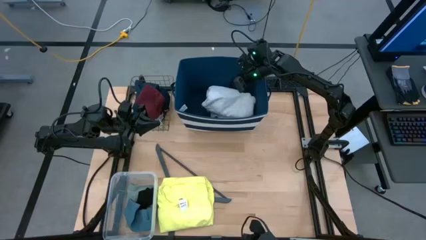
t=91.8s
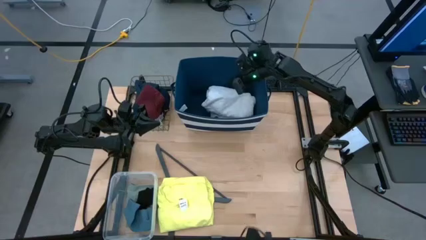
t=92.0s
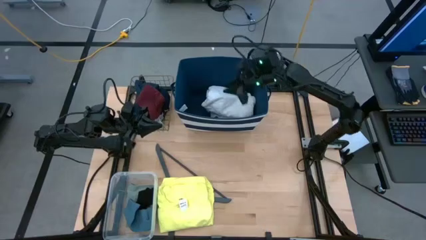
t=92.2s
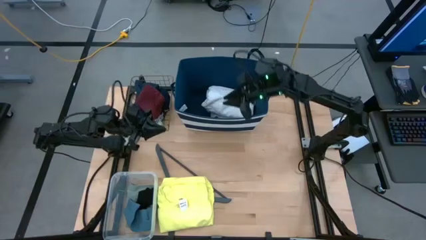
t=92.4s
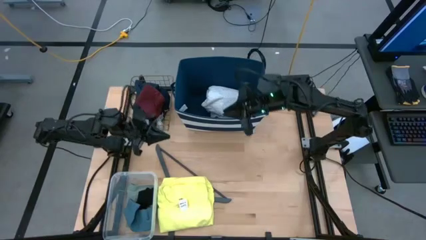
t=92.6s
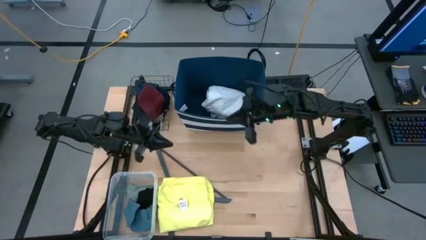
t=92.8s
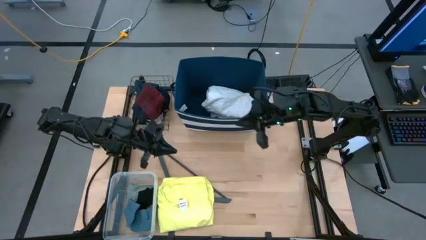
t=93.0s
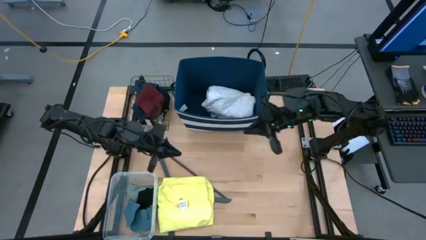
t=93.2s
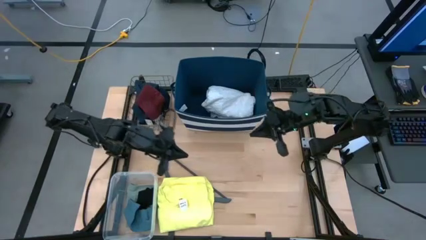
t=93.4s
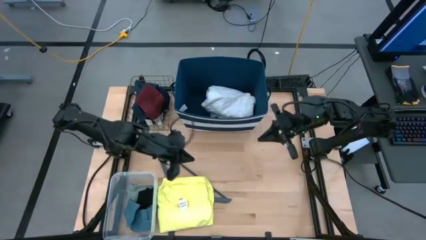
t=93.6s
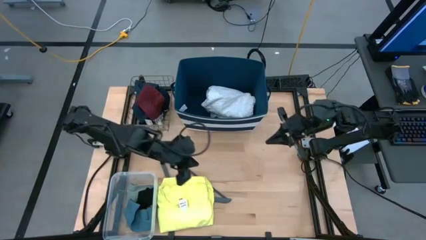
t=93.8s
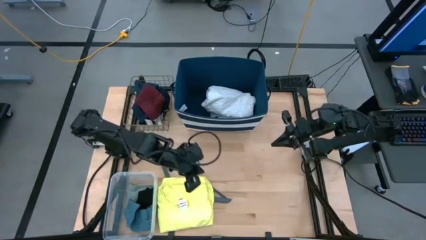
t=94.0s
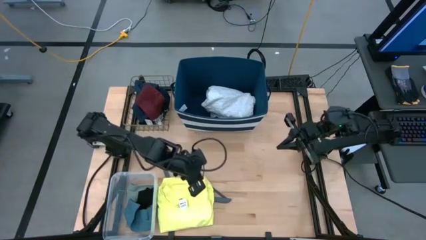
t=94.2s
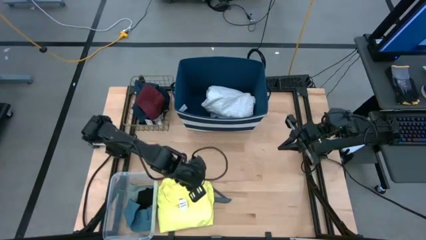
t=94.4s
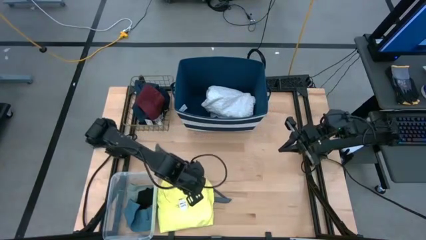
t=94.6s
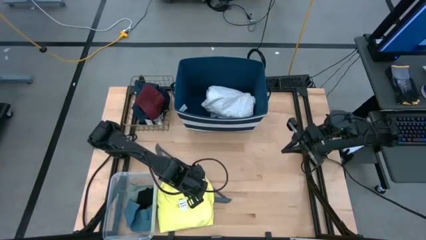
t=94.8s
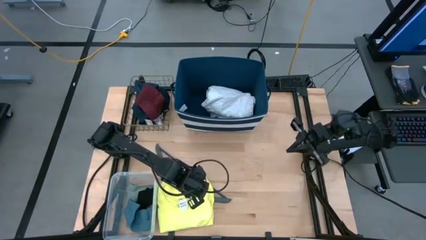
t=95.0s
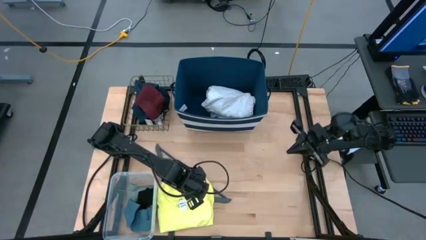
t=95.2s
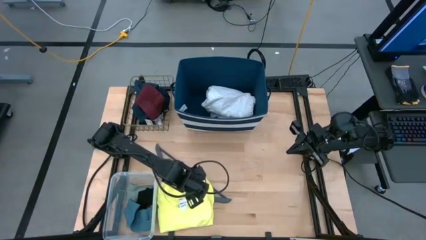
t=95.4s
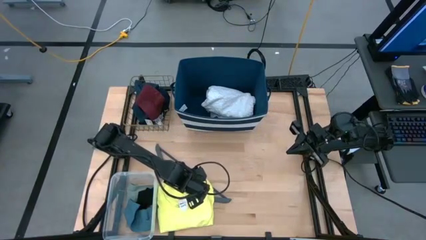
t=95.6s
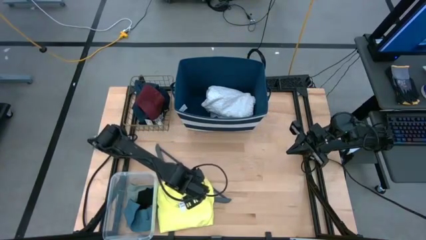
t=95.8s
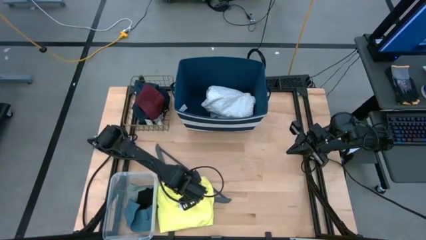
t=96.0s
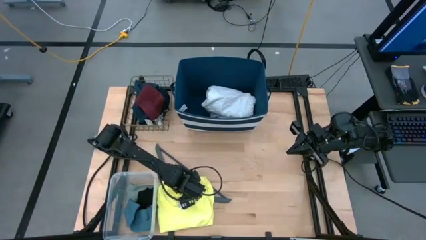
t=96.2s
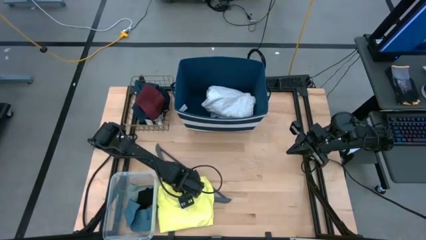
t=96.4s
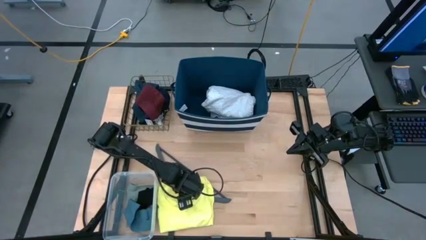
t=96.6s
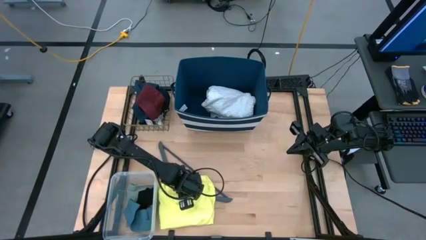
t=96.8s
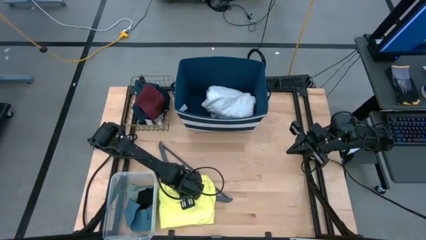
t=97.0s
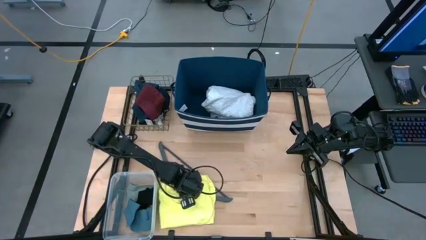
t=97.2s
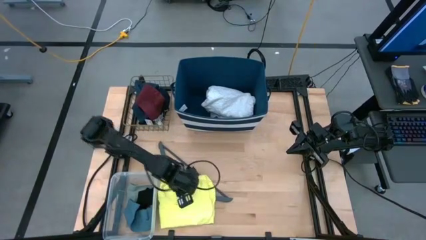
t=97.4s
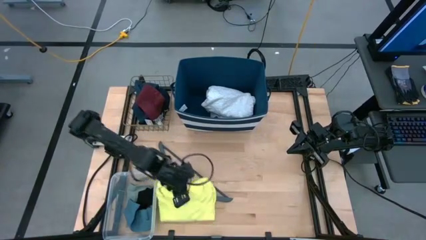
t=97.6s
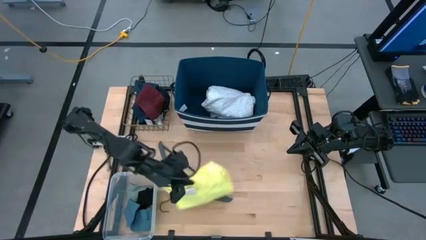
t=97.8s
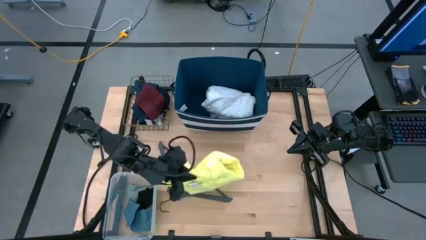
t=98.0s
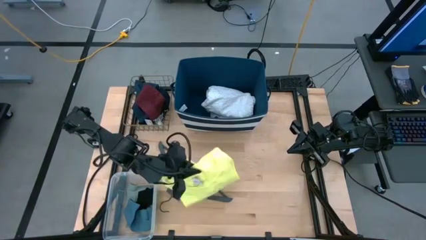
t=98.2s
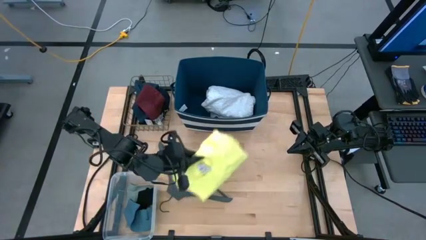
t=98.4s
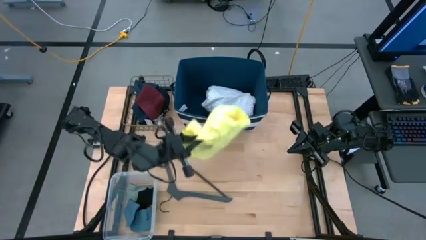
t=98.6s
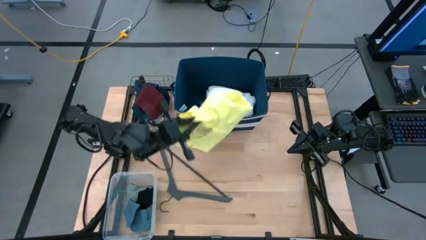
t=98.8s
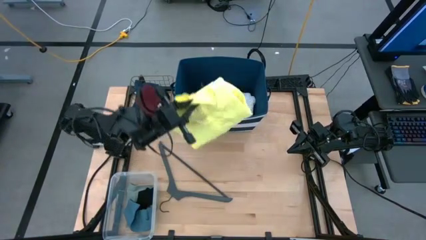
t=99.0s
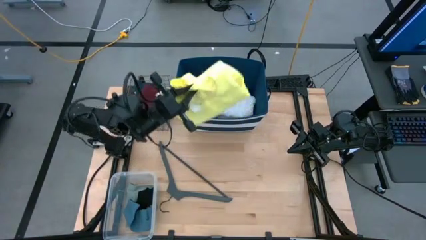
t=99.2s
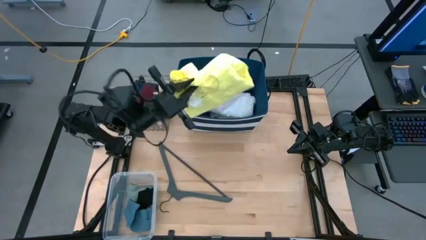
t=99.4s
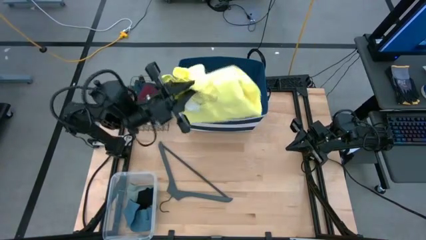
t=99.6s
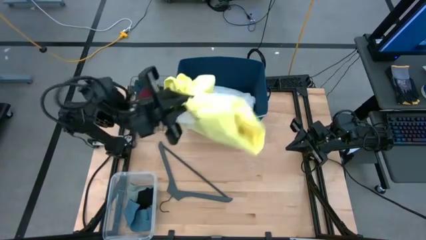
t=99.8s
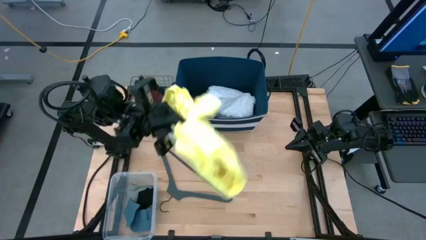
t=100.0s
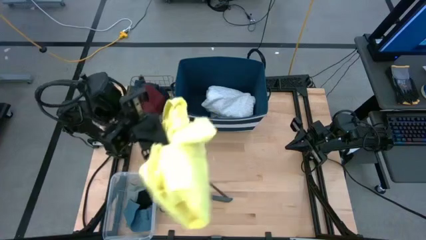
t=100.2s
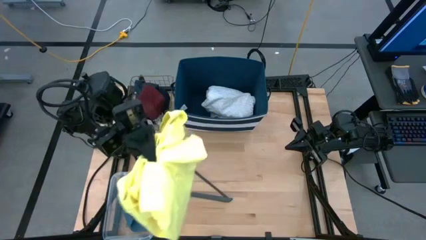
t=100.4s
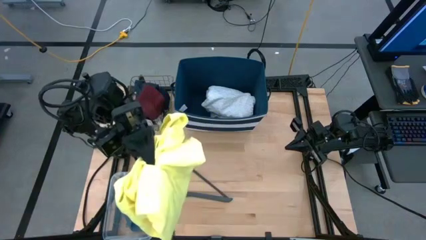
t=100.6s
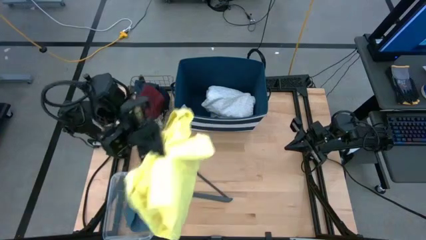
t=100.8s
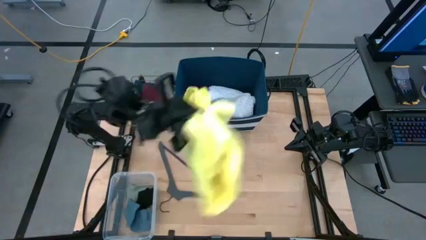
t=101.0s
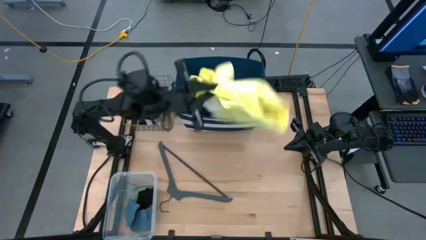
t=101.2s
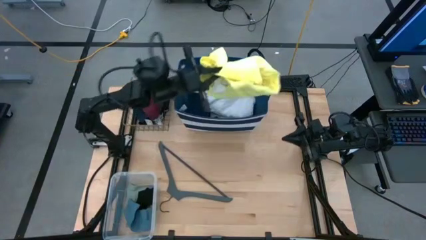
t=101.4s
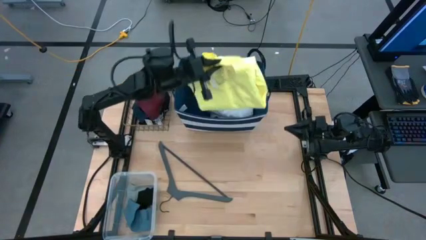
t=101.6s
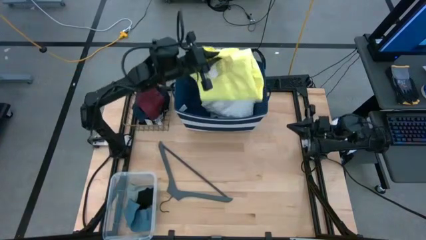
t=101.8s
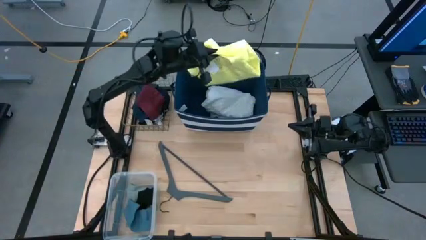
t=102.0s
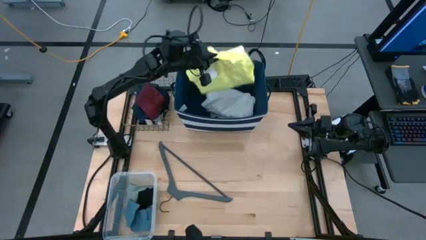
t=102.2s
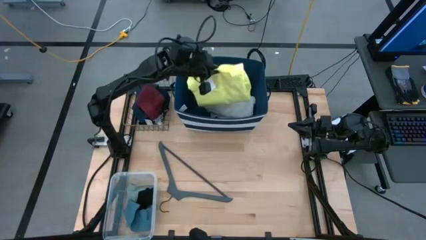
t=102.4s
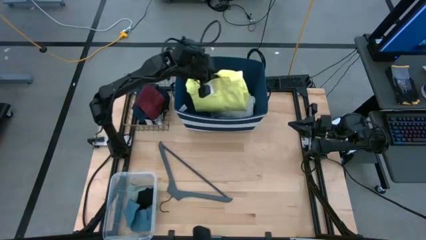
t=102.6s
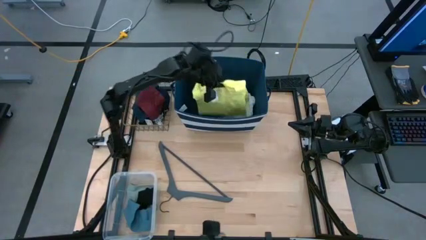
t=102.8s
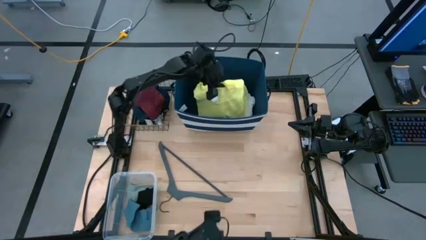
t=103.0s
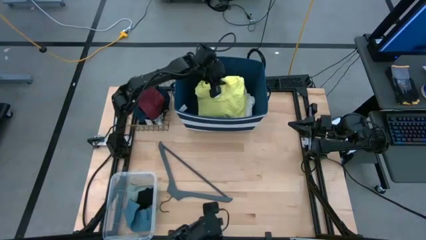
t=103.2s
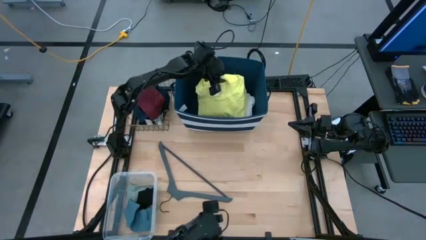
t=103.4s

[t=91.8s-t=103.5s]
Task: Pick & Place Cloths
Put the yellow shirt into the blue laundry bin

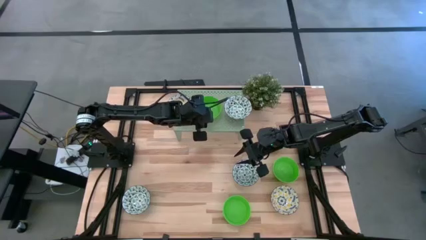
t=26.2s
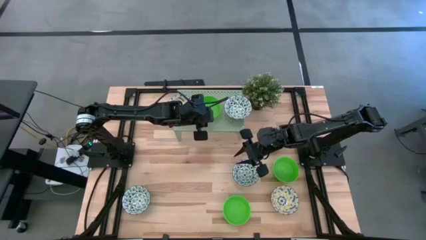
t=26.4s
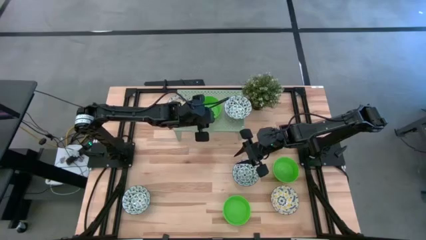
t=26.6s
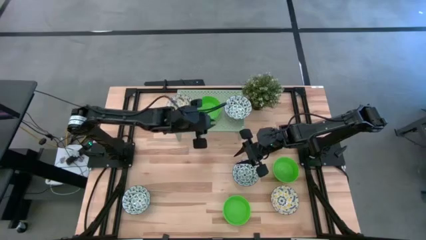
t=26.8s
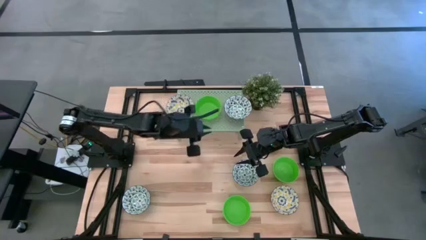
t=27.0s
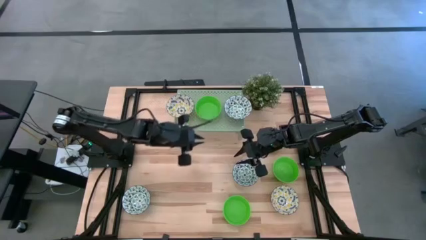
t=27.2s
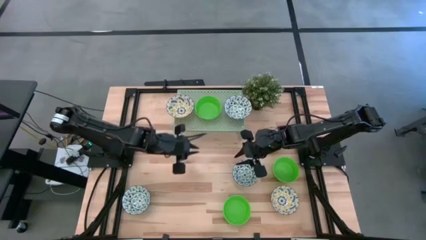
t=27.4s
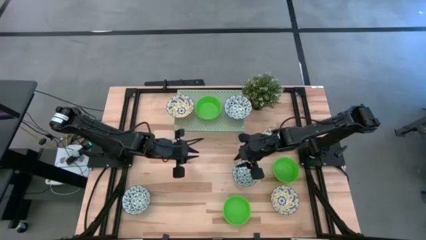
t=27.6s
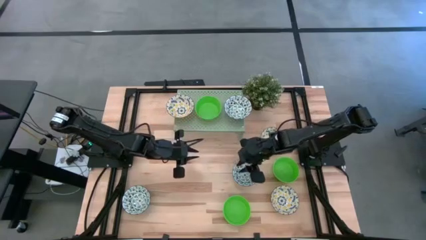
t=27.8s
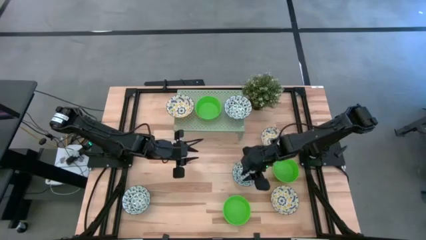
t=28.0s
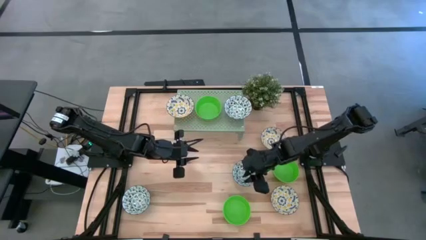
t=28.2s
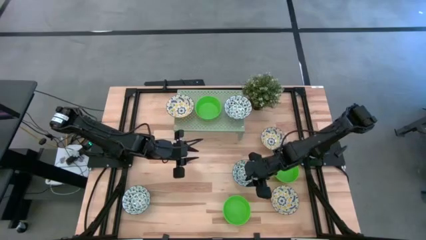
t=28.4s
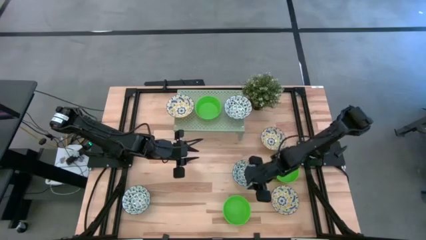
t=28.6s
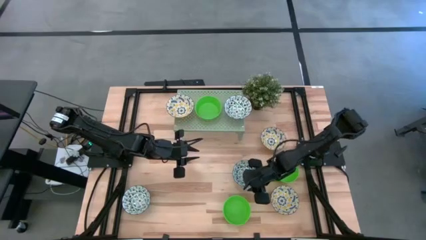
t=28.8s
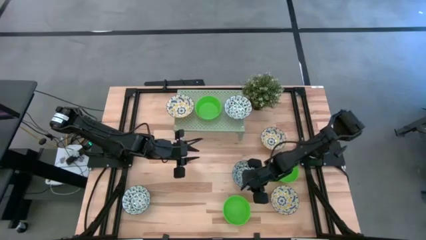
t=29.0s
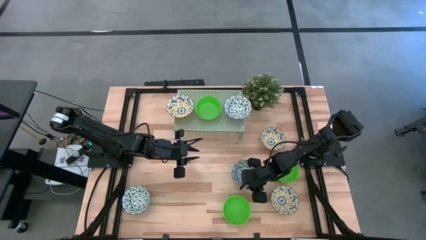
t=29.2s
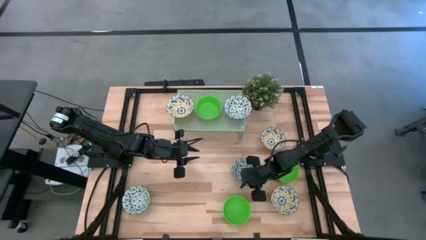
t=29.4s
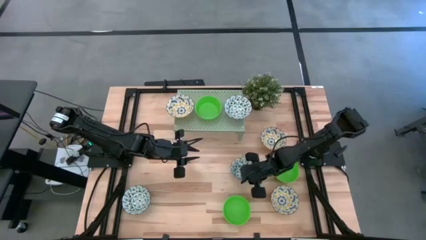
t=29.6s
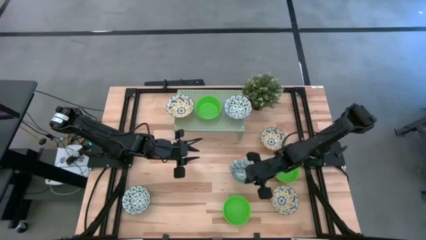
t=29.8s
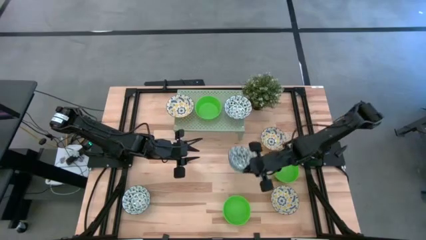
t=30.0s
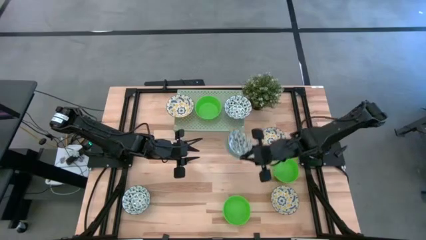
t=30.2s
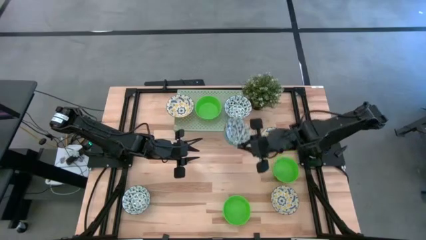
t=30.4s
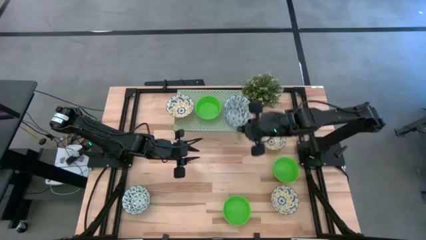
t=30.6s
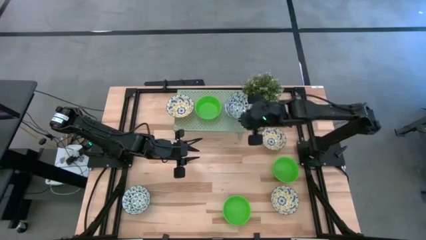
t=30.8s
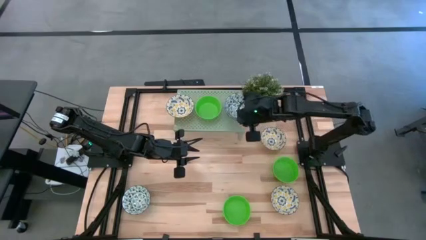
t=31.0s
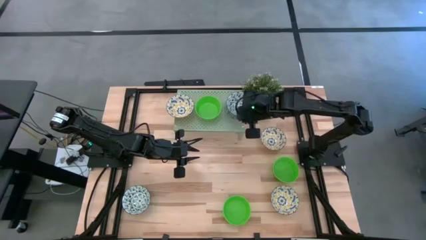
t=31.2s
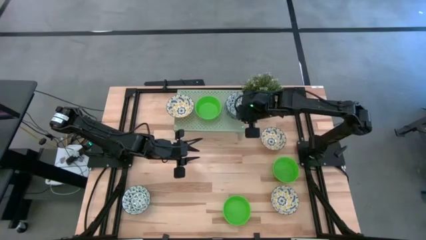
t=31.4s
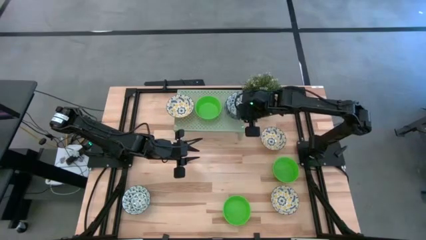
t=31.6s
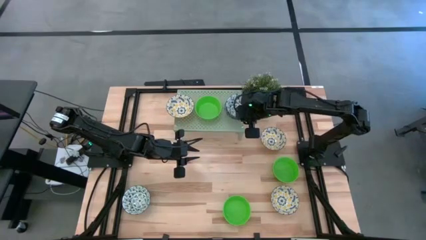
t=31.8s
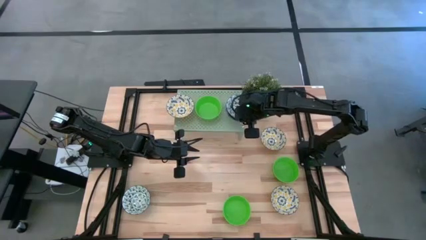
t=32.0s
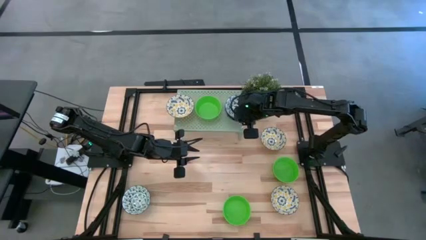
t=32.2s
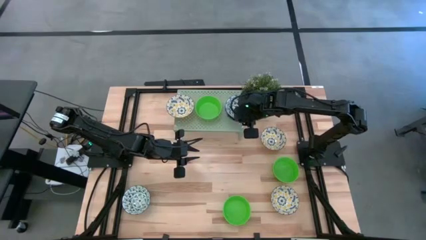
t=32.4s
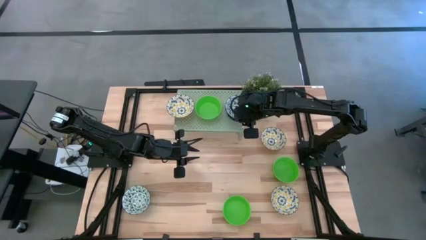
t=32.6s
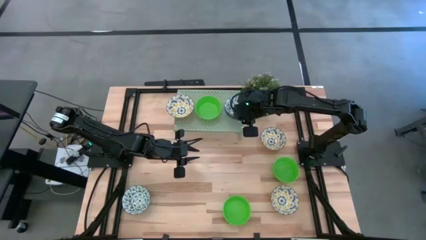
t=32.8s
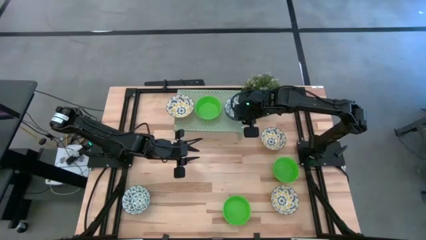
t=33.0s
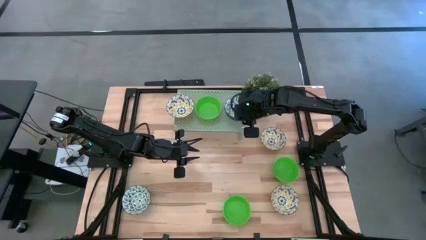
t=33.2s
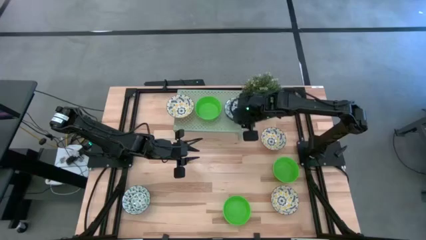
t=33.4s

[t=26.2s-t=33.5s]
Task: Pick & Place Mini bowls
Stack the right blue and white bowl on top of the blue and white bowl on the shelf
